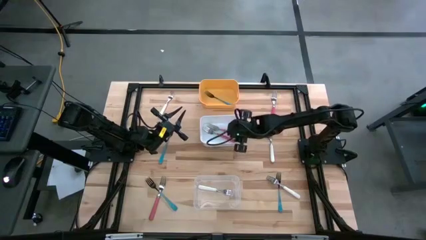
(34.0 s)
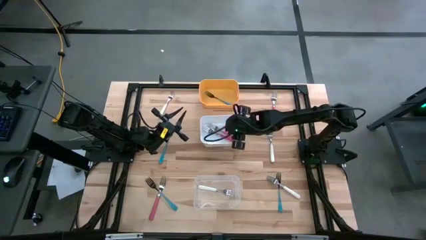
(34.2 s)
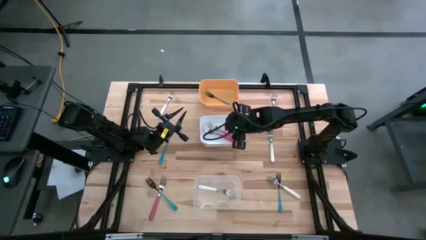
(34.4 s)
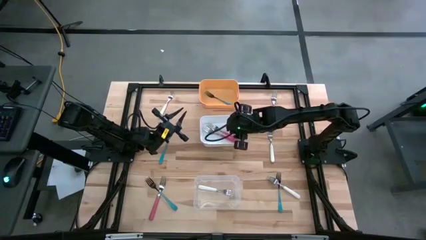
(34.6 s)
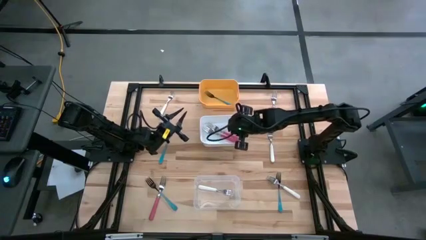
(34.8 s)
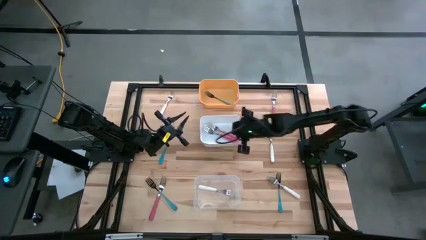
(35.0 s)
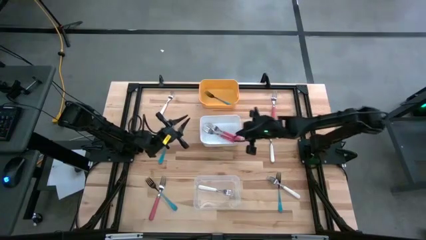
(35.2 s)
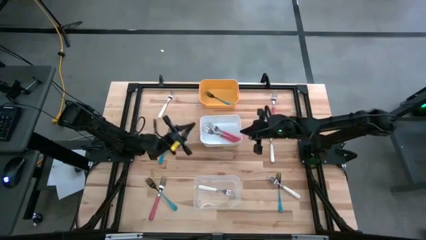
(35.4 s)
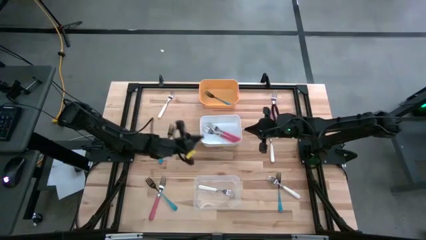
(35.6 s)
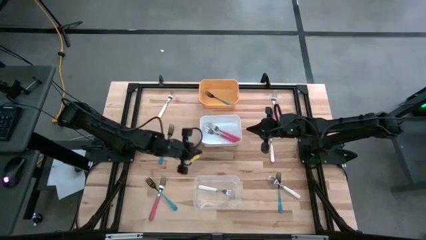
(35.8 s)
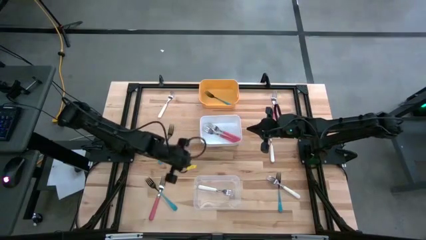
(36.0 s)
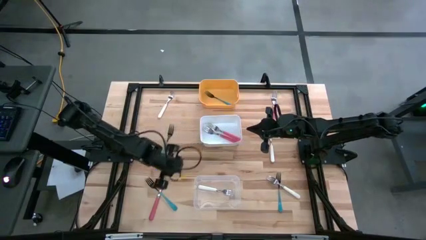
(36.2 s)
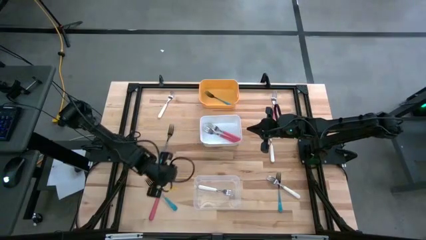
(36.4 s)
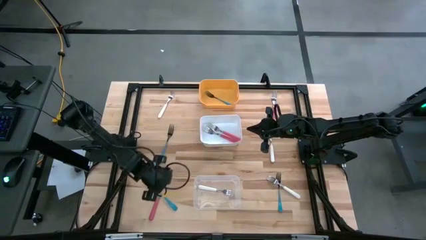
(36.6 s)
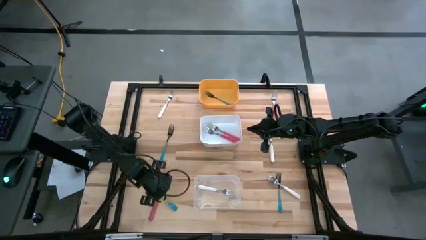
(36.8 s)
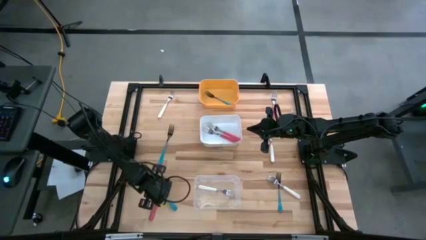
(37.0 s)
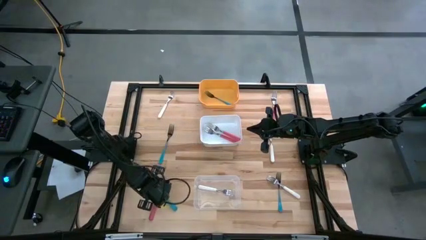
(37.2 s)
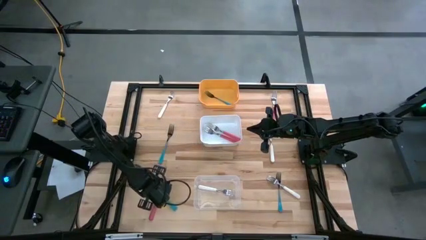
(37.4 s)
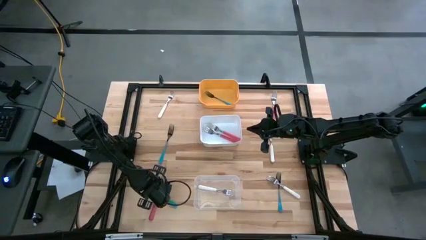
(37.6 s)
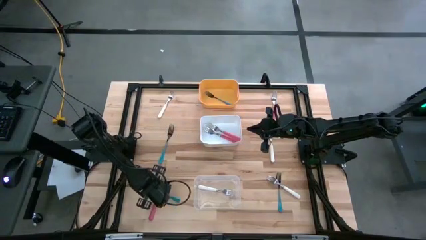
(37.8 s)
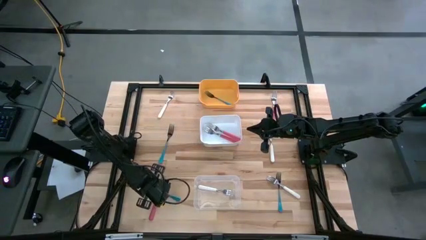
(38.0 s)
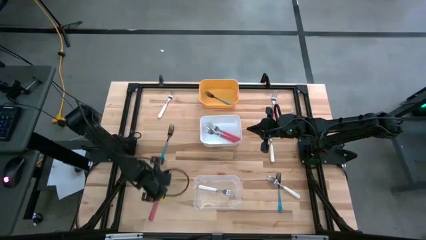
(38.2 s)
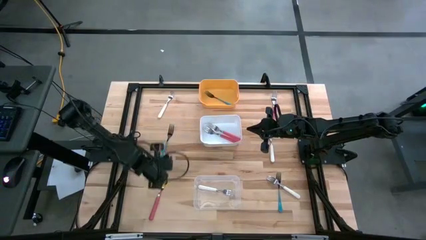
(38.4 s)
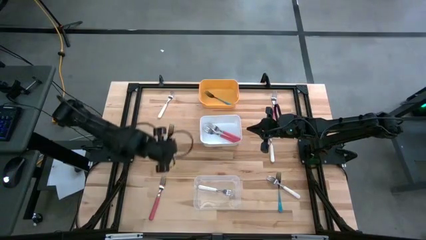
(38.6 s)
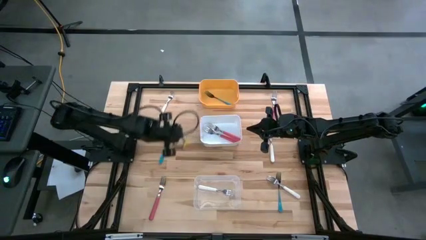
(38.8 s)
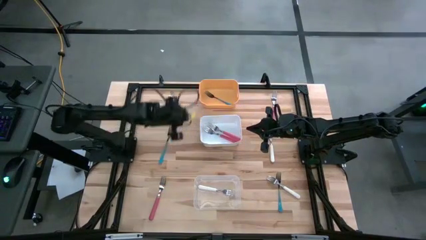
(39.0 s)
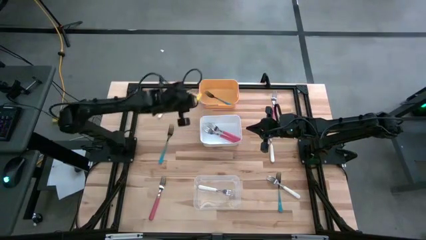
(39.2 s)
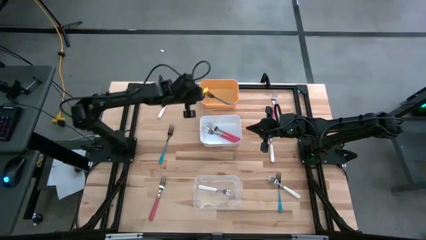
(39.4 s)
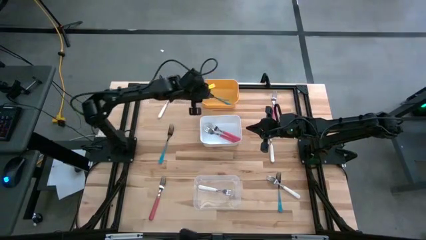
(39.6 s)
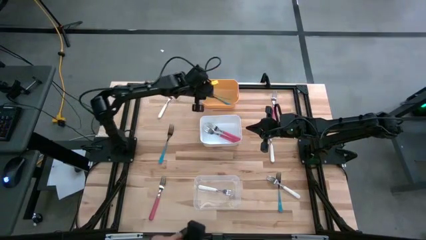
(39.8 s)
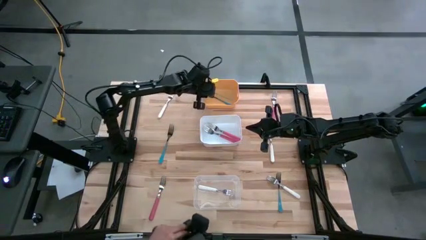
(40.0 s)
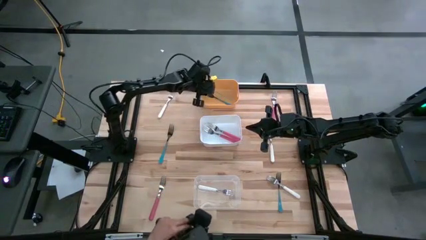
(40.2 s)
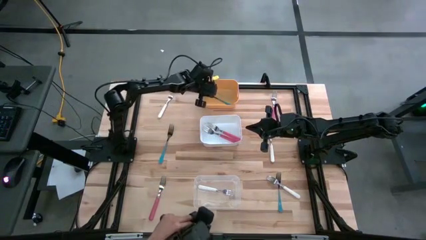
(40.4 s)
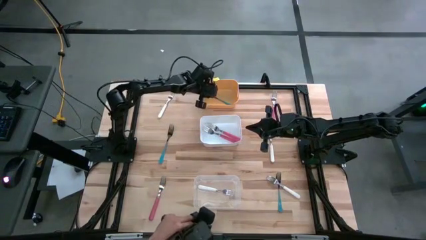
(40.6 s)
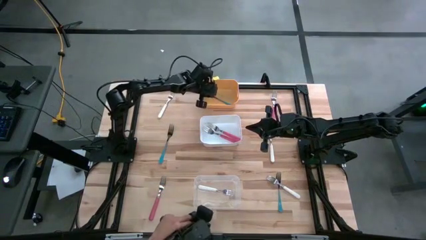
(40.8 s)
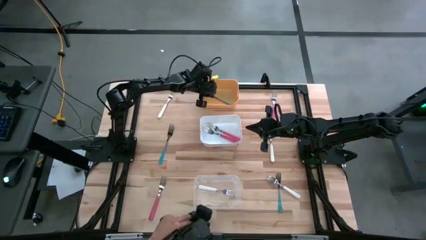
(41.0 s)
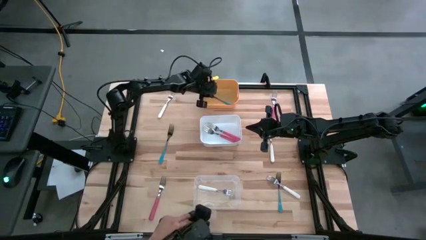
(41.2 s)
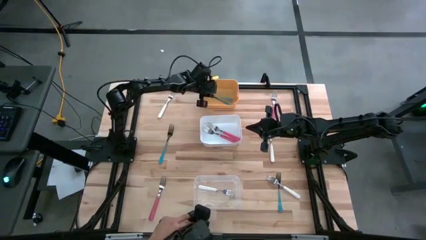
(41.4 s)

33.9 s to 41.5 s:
Task: Sort silverware by color (type)
Put the bottom left blue fork into the yellow bin

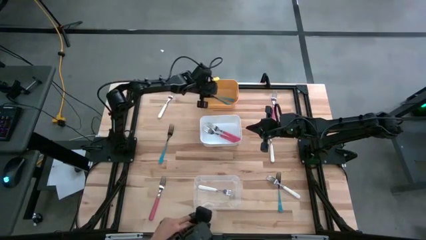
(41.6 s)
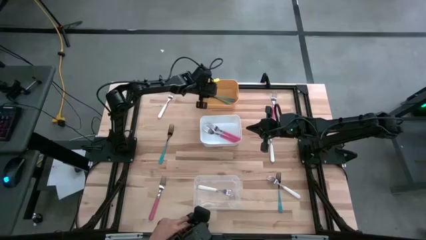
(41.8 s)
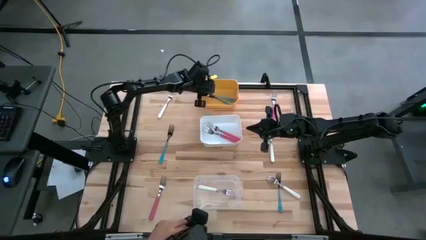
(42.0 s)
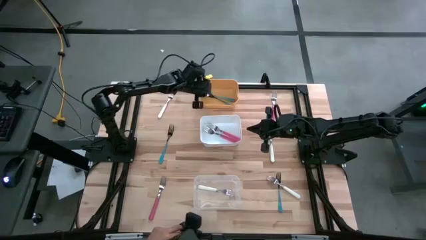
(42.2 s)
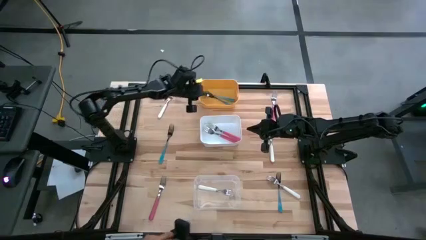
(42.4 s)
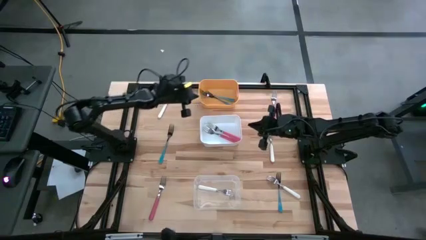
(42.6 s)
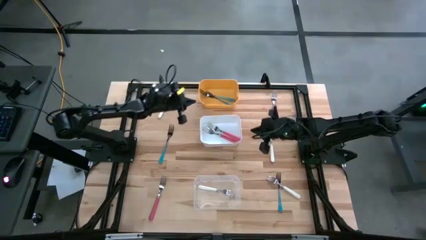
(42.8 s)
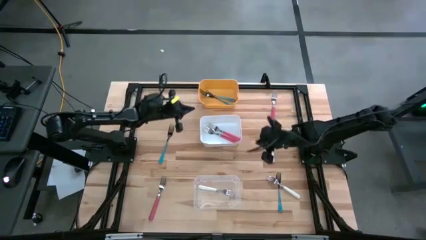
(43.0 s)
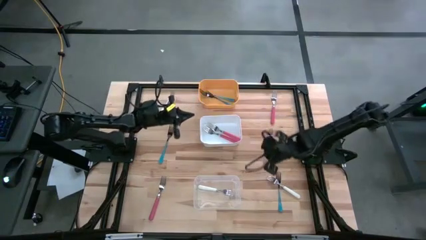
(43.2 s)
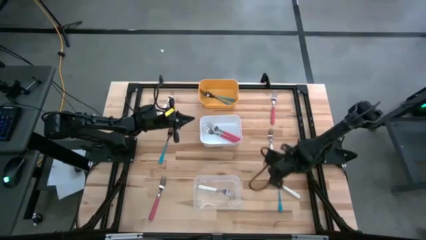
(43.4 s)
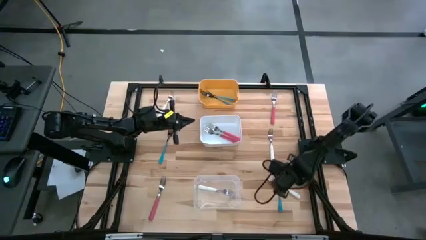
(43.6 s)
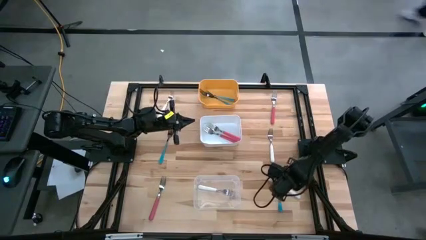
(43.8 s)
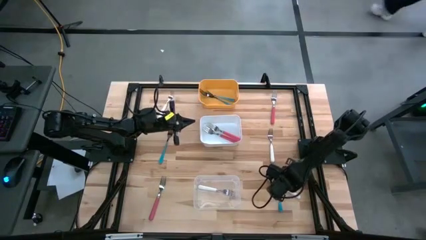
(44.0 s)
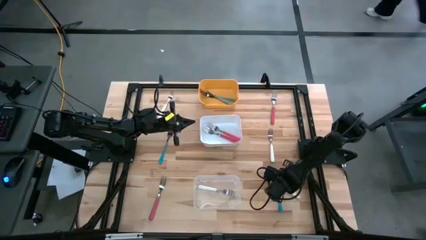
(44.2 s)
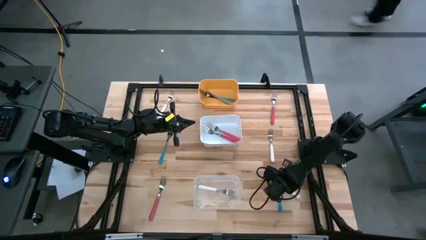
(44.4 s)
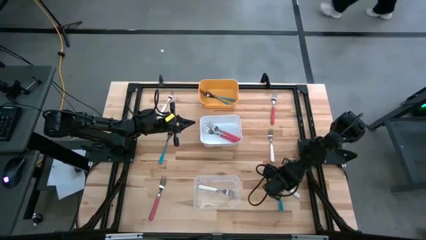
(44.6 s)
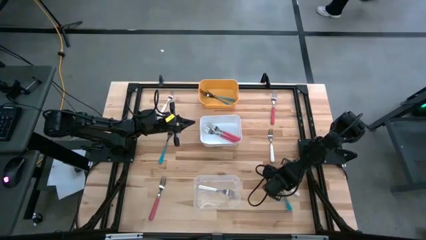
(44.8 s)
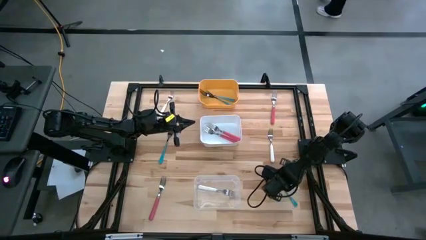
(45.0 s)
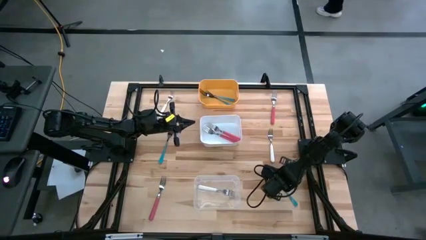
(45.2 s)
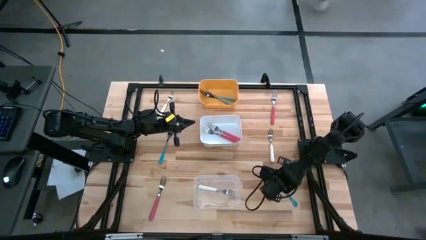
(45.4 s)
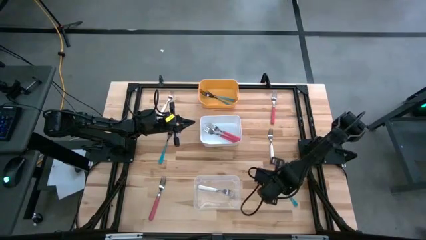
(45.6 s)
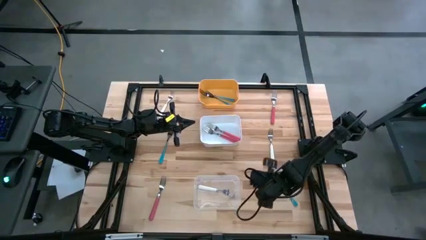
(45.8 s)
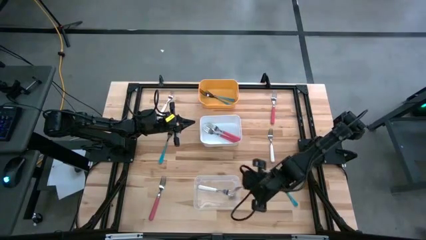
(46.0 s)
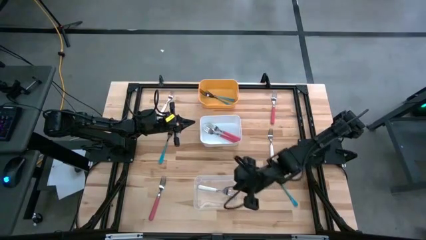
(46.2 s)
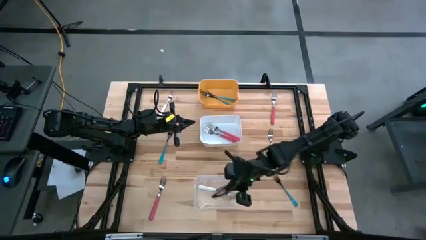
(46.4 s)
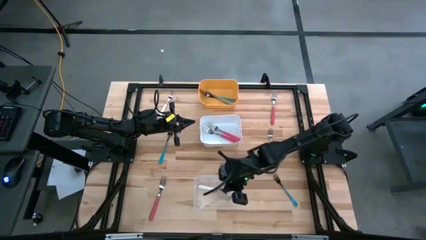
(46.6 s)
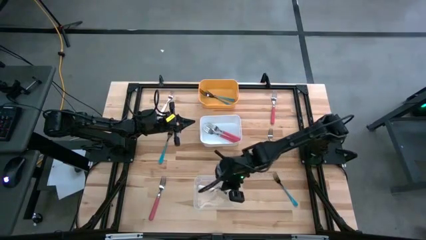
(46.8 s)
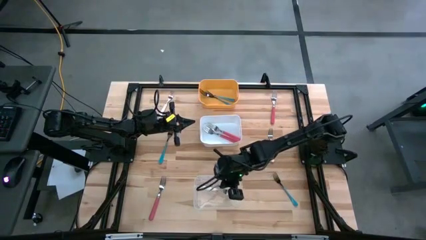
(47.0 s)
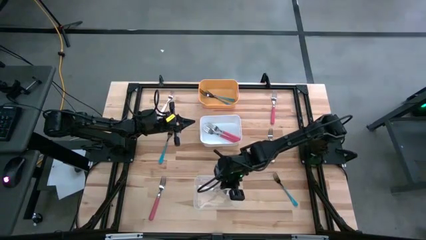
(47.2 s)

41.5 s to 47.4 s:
Put the bottom right white fork into the transparent bin

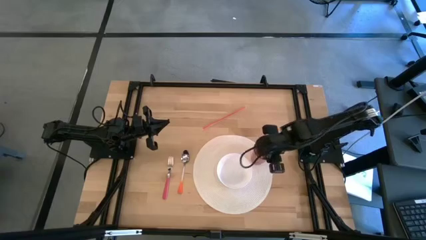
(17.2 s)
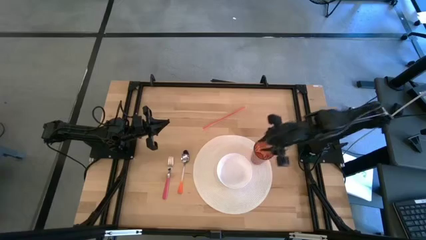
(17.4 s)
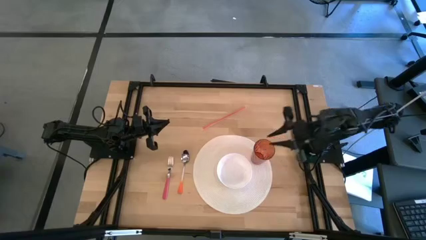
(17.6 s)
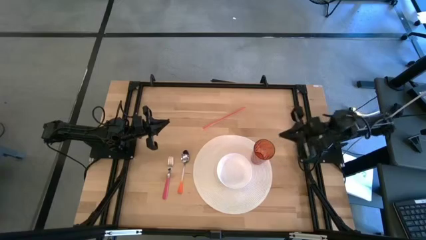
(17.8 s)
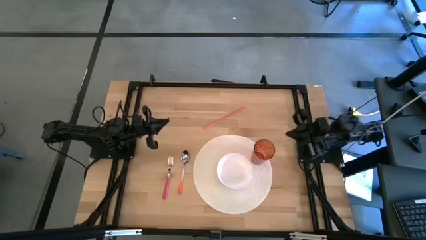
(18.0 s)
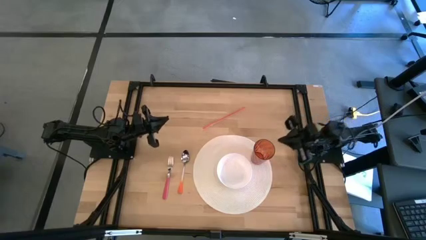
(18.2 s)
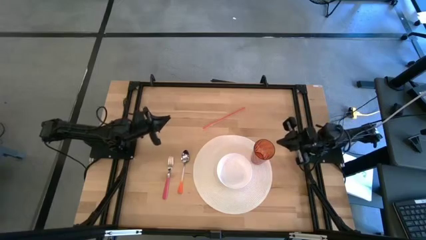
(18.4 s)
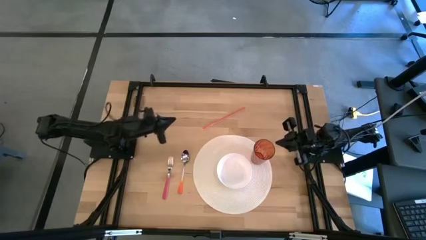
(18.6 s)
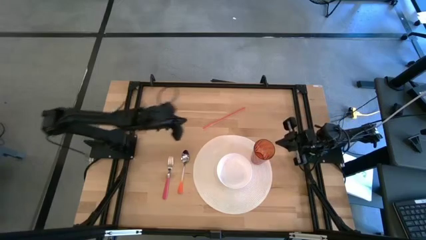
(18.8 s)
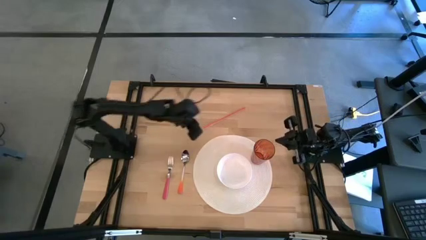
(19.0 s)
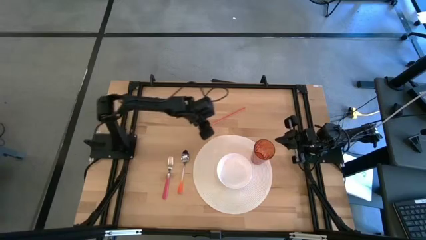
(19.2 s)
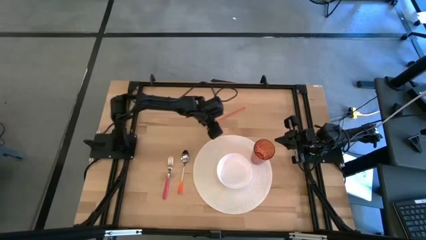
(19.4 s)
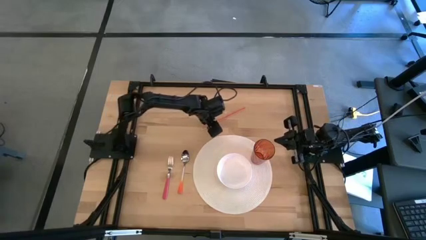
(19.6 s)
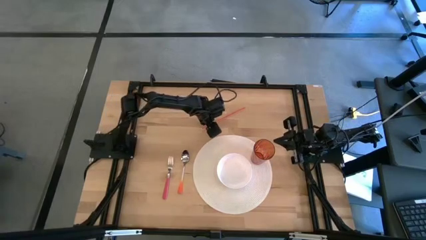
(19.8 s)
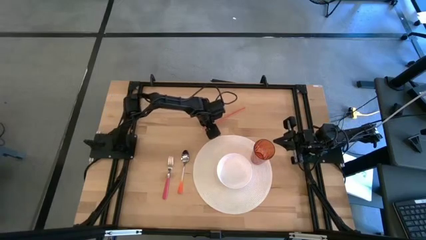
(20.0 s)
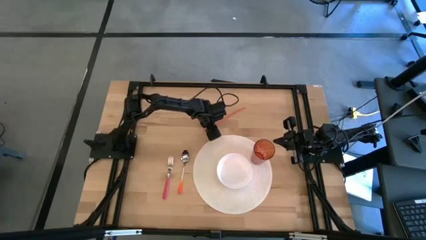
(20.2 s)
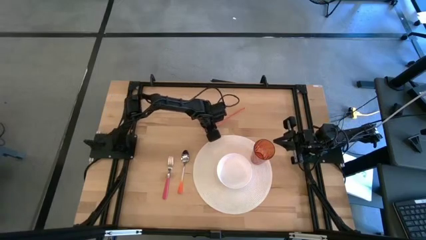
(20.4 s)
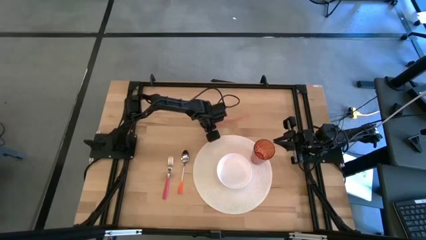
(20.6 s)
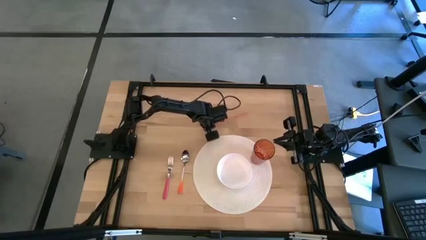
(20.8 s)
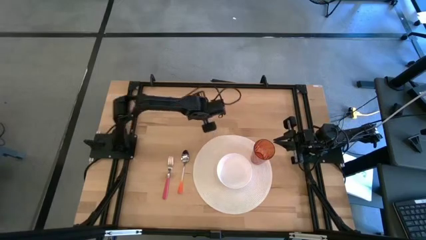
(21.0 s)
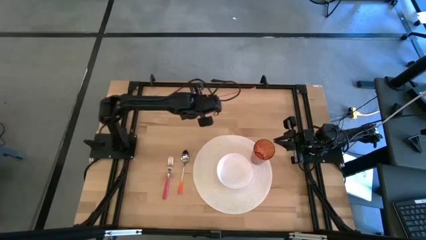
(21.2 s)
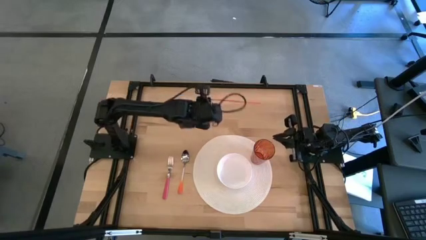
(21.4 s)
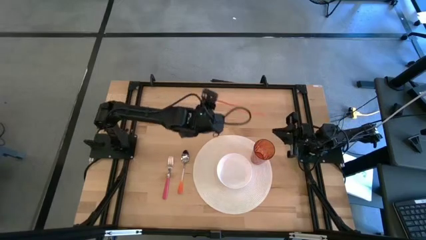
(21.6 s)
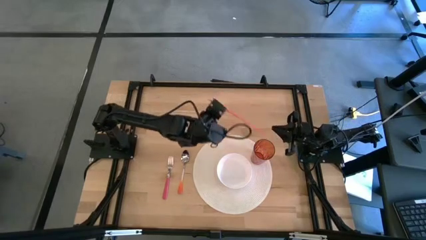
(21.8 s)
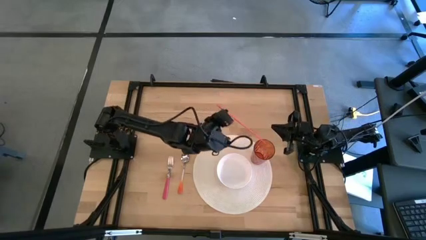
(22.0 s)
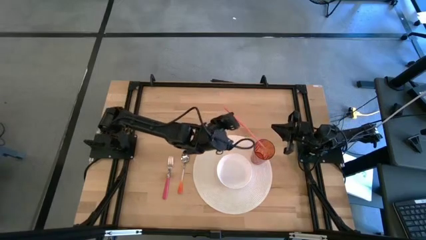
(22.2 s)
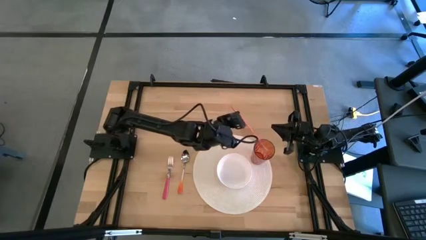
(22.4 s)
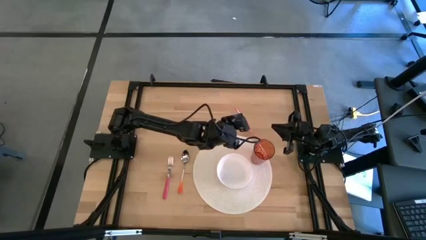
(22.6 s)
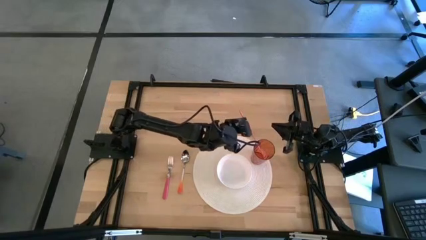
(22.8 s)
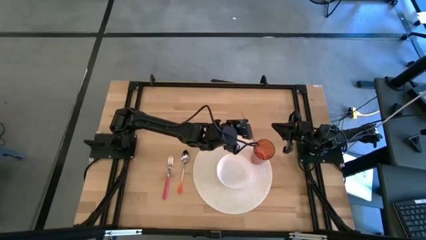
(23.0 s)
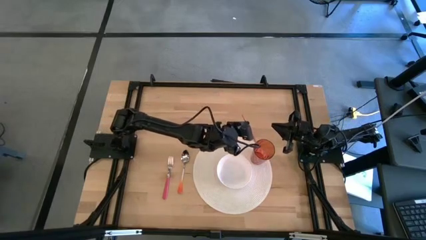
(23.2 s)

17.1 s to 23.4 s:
Task: Pick & Place Utensil
Put the orange straw into the orange cup on the white mat
